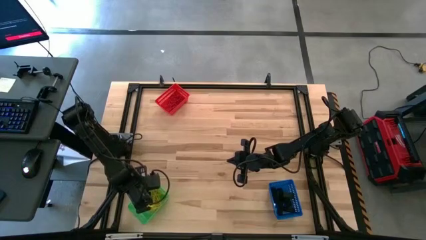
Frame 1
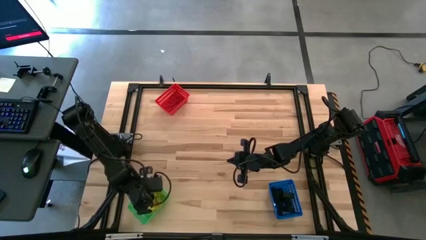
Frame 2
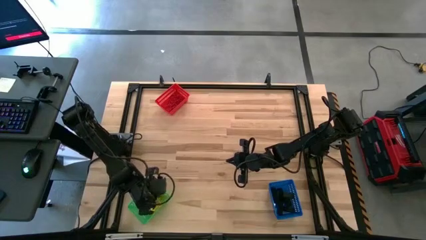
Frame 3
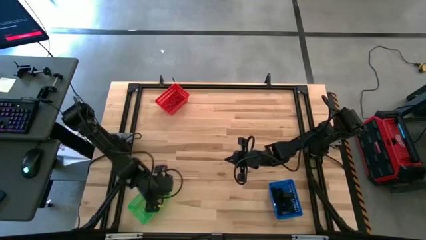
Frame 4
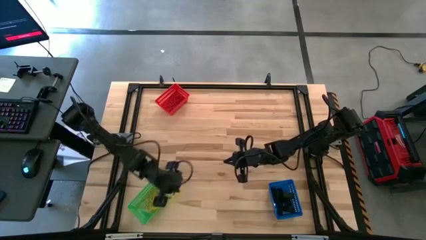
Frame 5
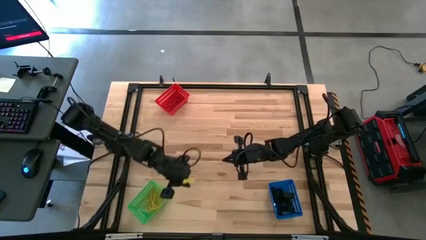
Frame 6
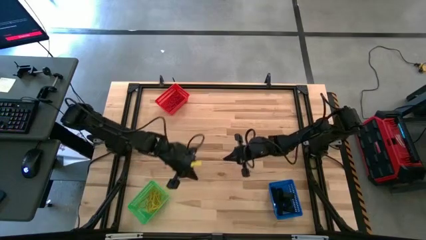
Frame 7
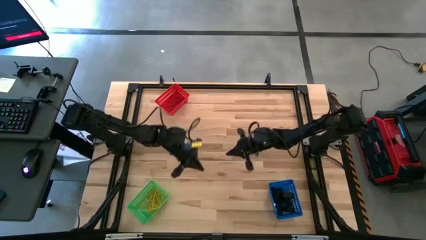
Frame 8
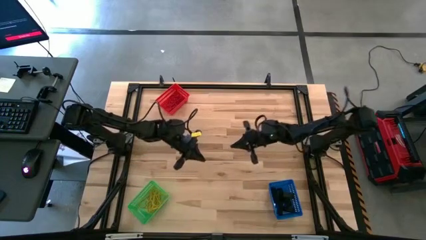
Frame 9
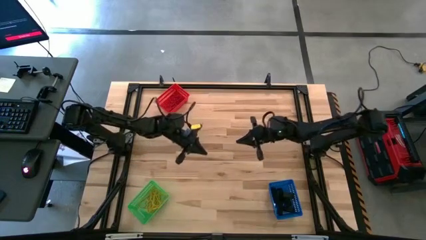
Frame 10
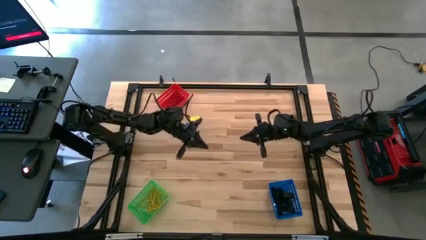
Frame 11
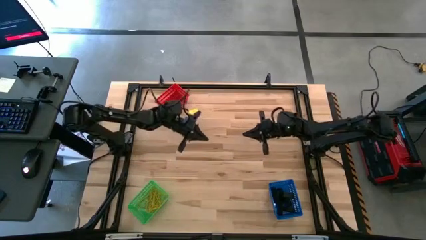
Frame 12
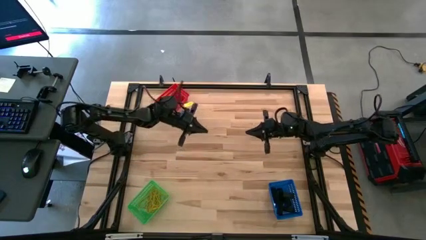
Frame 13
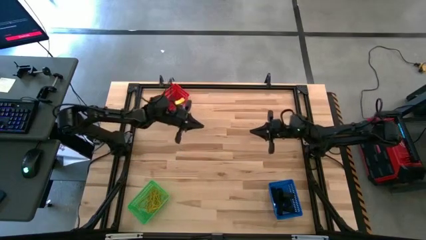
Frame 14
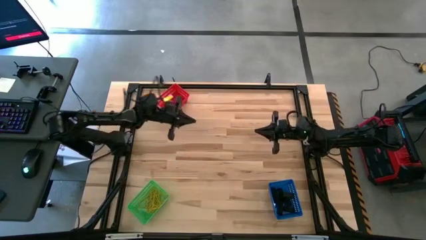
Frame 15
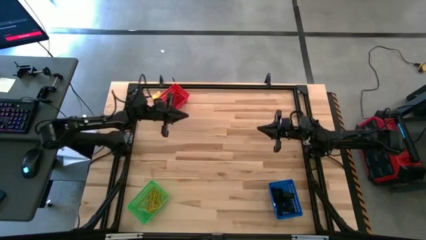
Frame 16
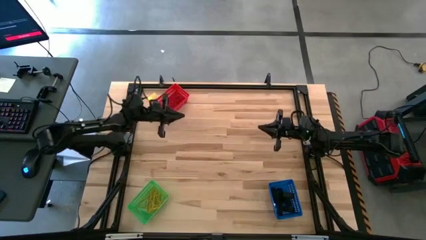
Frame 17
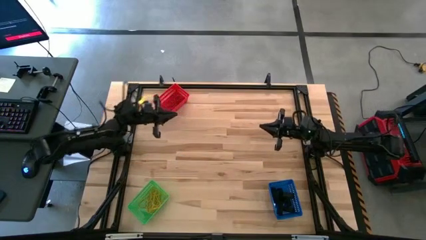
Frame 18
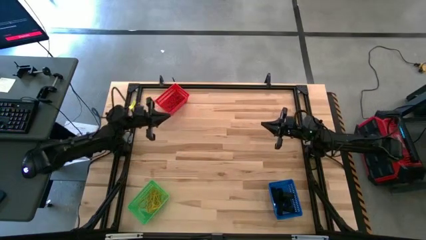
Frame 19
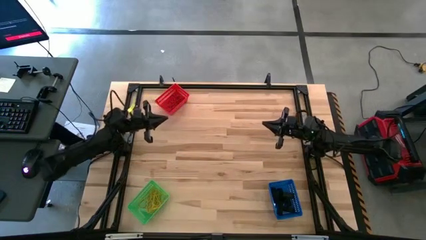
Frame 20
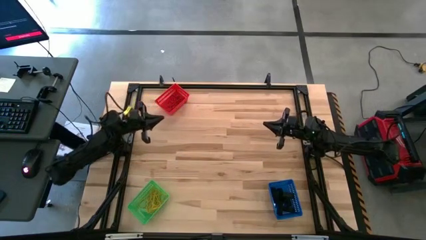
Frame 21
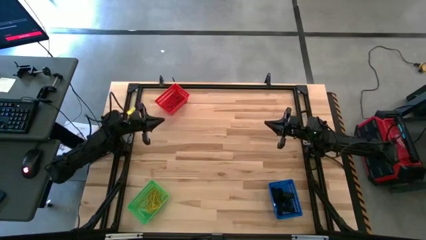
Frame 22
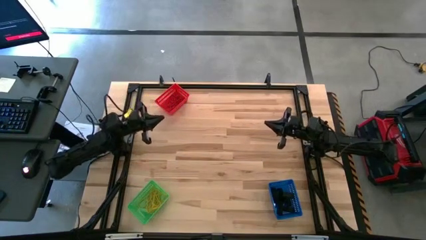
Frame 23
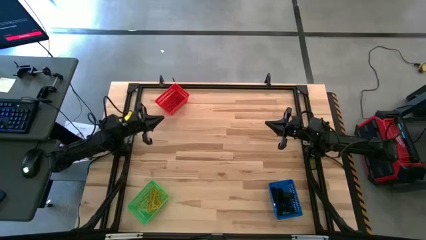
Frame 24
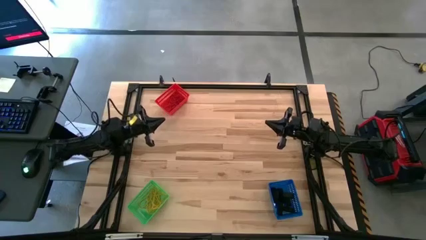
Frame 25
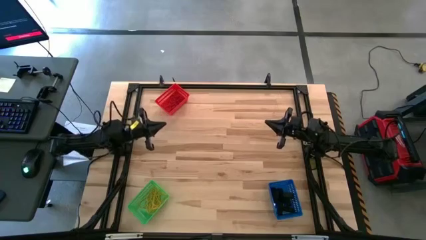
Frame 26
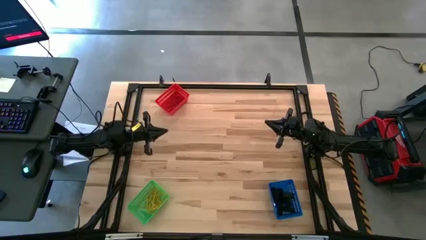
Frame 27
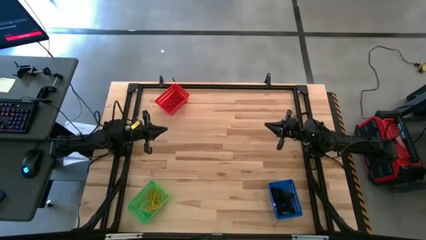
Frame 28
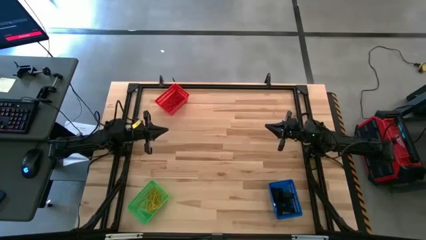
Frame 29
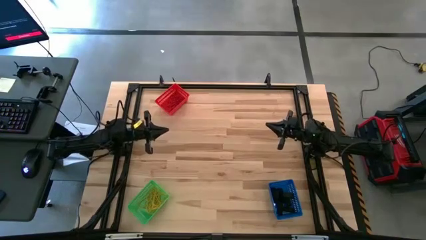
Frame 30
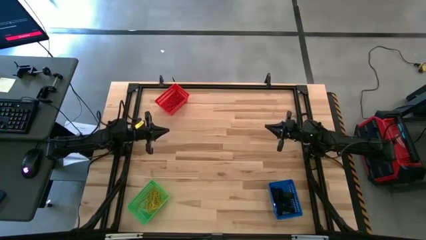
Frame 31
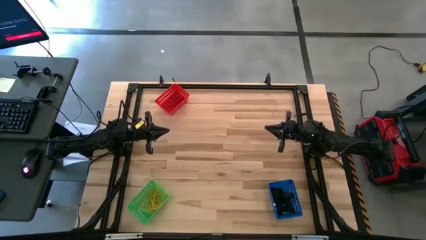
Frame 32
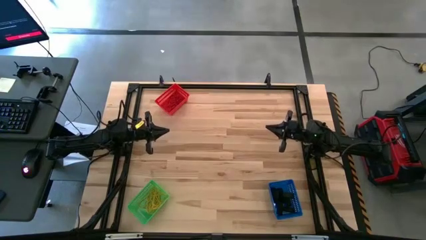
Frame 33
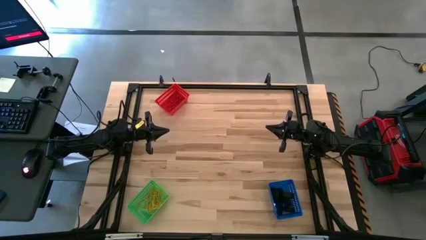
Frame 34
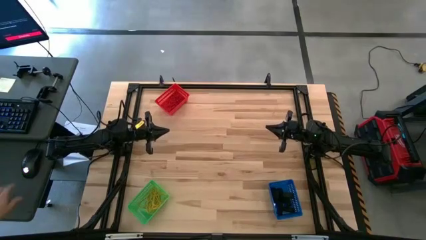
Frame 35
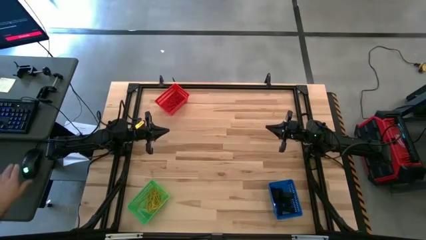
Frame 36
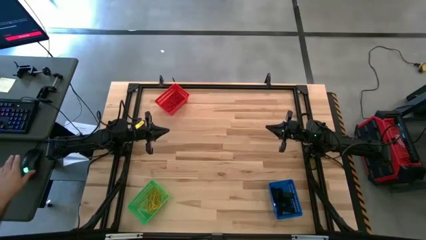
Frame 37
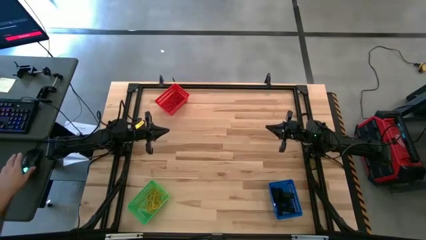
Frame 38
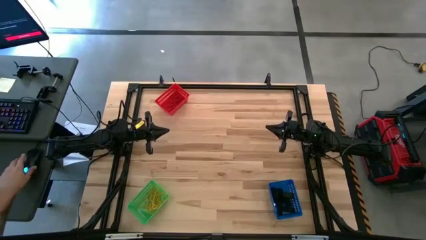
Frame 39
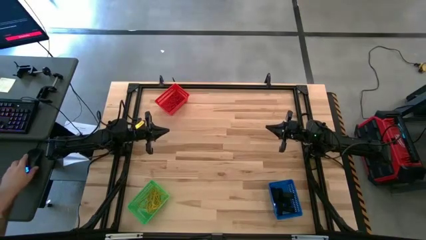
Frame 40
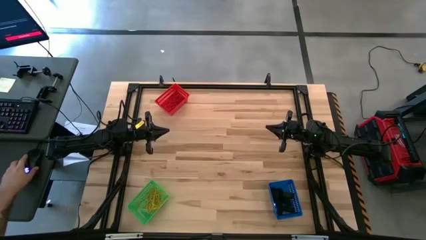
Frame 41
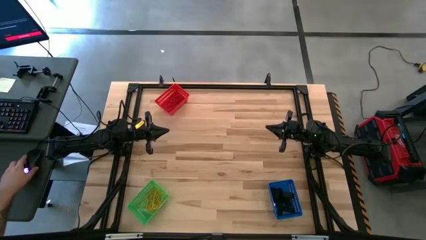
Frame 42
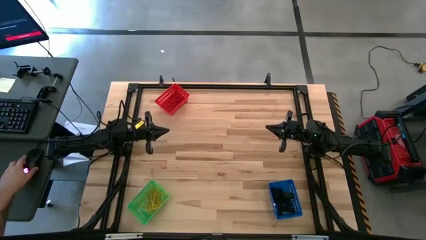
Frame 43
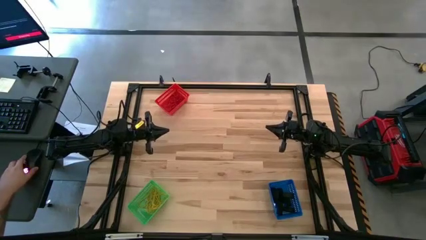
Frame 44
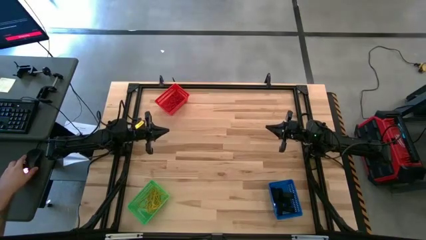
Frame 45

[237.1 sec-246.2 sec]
Task: Sort rubber bands into baskets
Return to Home Position

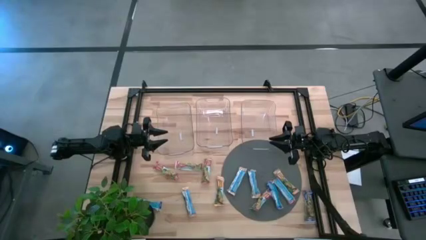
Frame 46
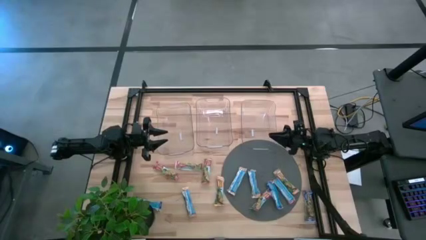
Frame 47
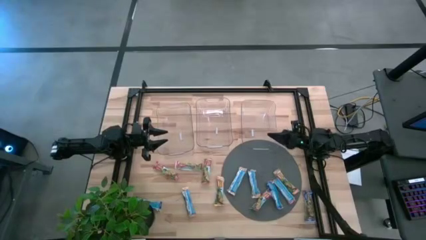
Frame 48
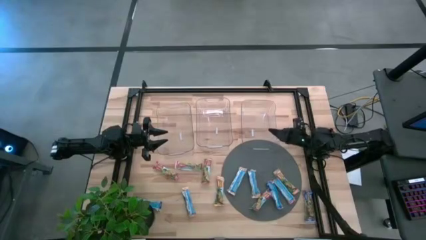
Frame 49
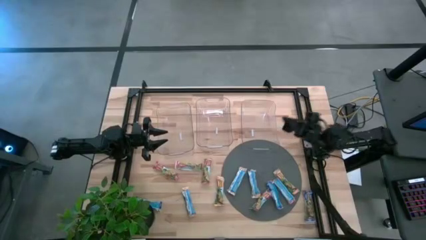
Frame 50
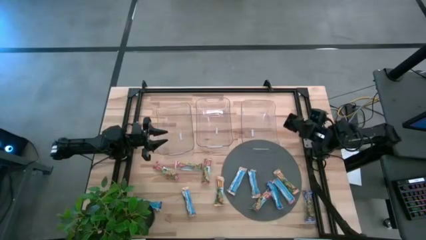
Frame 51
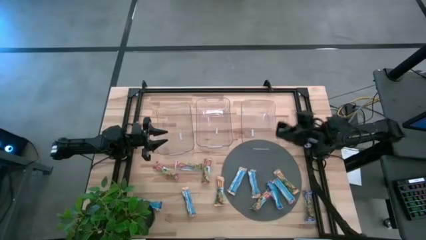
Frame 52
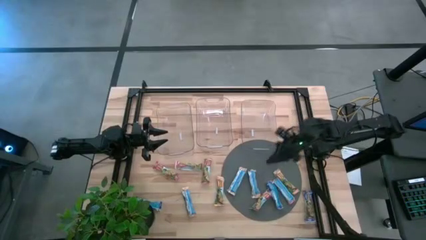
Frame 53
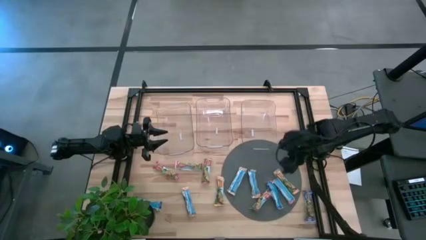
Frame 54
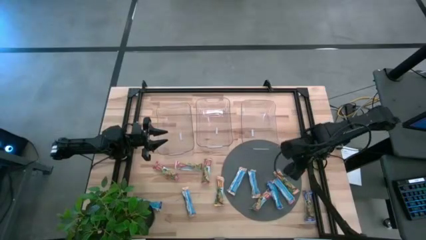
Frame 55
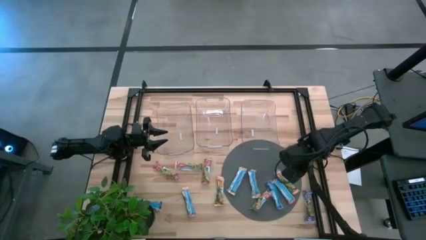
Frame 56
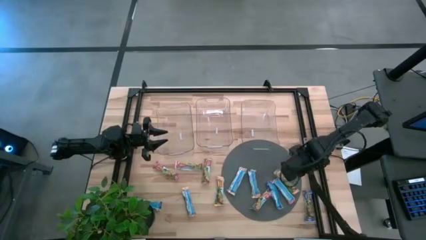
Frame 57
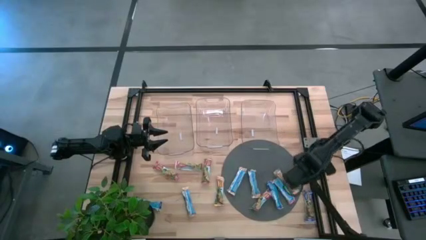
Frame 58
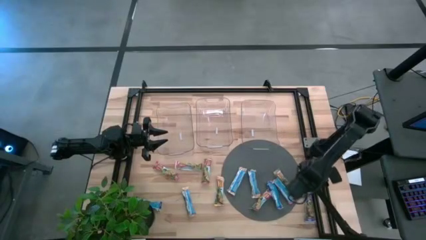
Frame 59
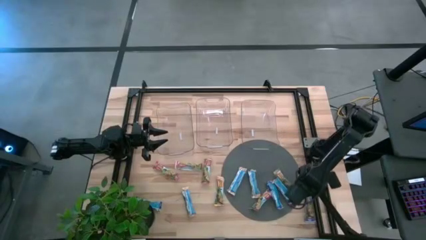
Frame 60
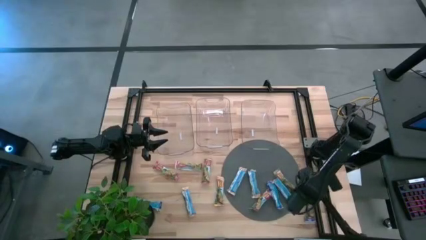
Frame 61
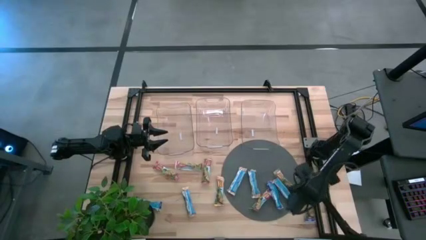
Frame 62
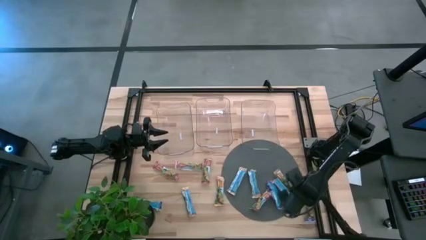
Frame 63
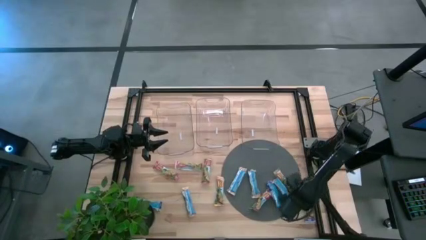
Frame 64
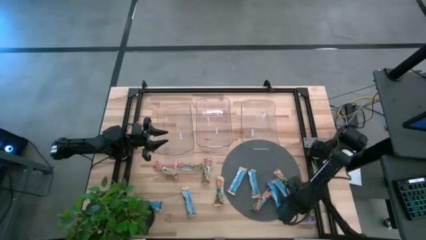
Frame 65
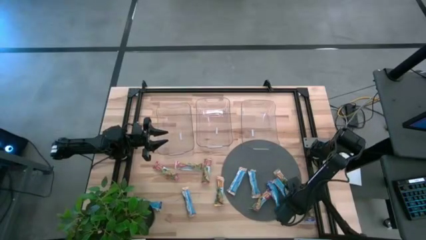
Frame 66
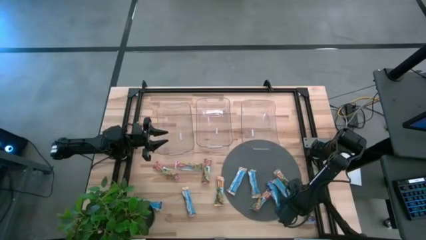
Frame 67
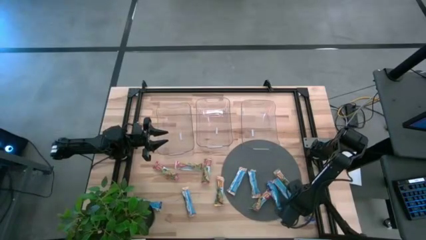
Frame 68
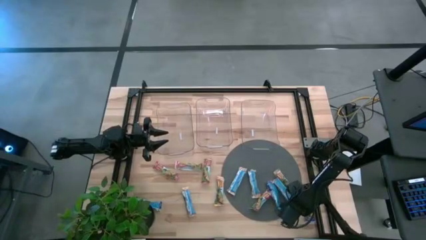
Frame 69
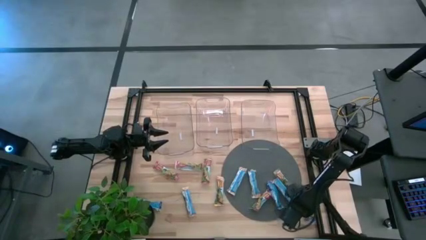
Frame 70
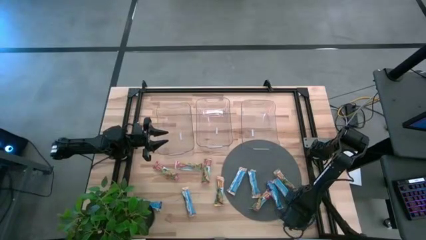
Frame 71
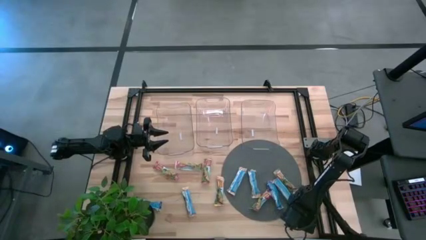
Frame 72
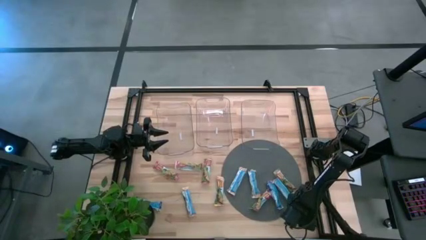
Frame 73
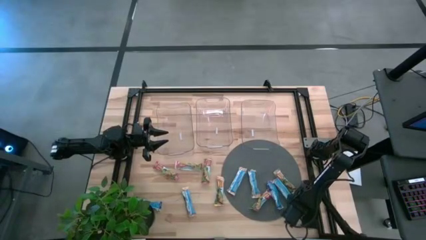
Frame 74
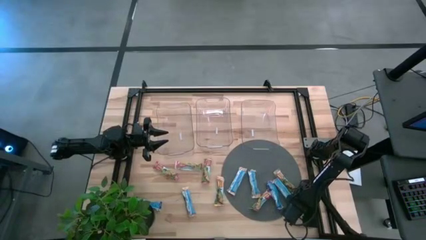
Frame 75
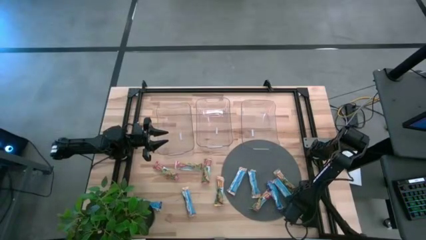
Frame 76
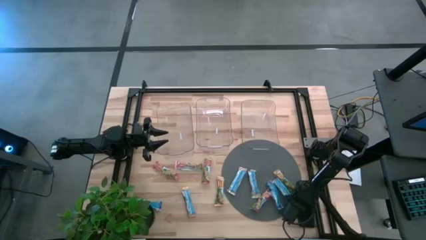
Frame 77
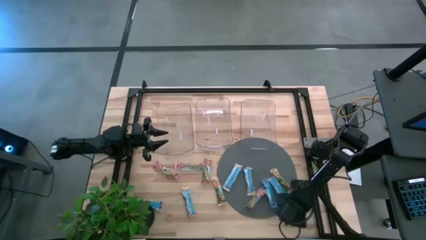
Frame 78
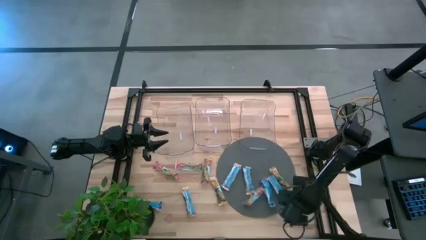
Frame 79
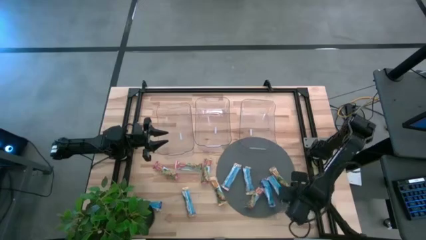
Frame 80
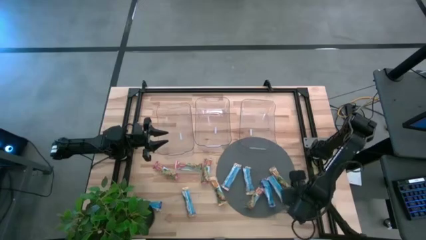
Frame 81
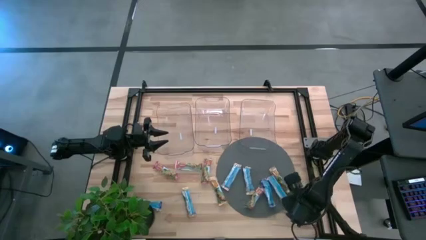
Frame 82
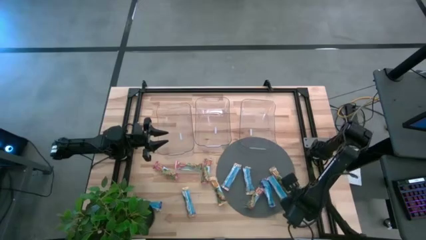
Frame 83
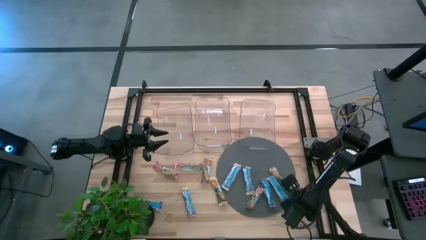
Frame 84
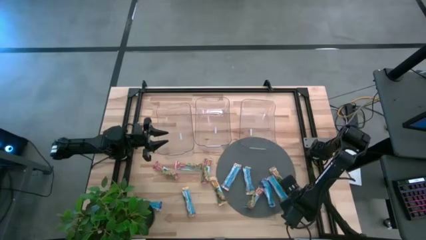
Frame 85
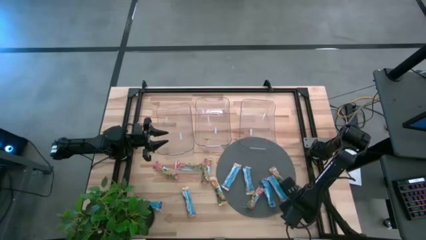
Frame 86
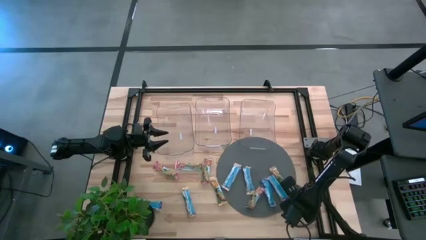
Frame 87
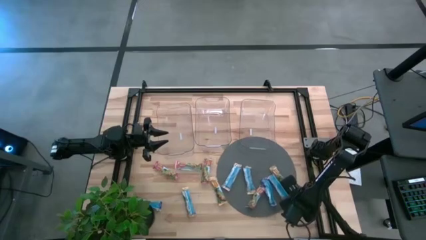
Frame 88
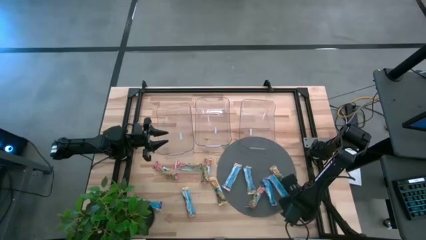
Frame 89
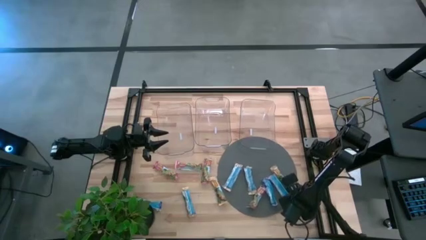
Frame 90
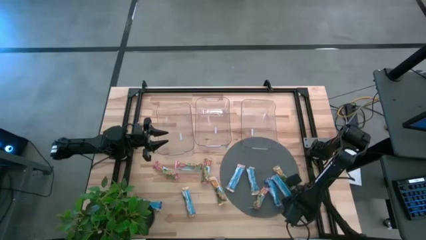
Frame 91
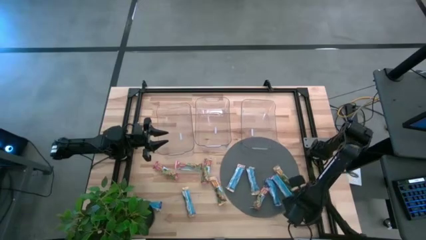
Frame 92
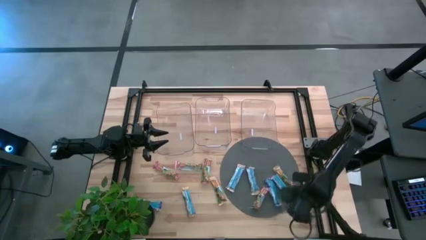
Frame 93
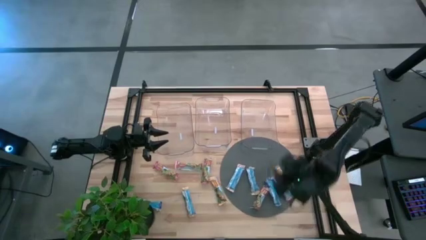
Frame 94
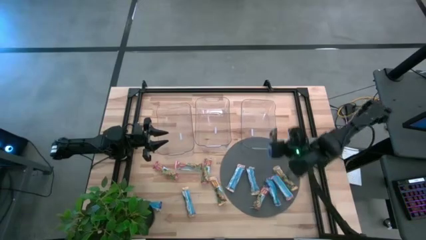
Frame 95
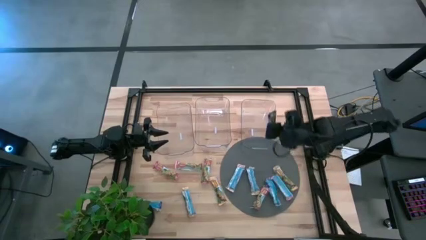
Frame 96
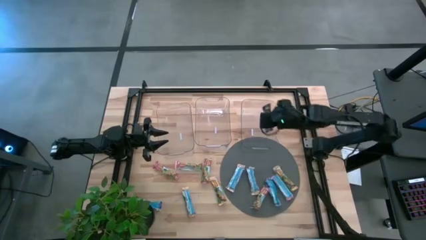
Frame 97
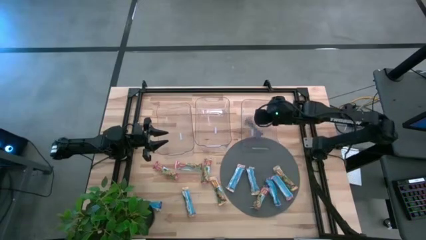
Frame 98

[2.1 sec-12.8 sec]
Task: Pick and place Granola Bars by type
Put the blue snack bar into the right transparent bin
